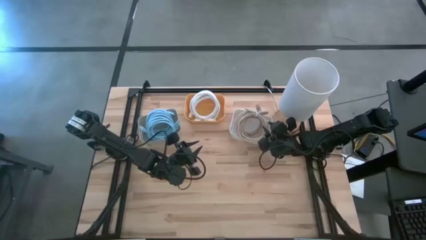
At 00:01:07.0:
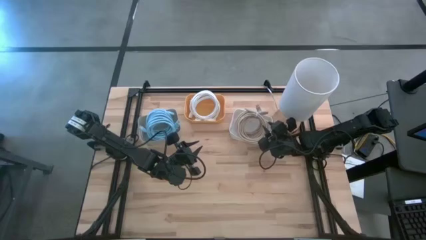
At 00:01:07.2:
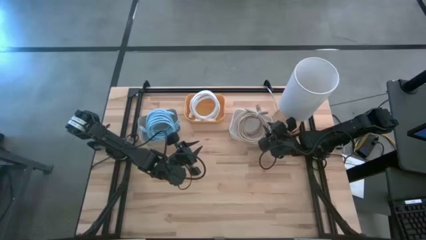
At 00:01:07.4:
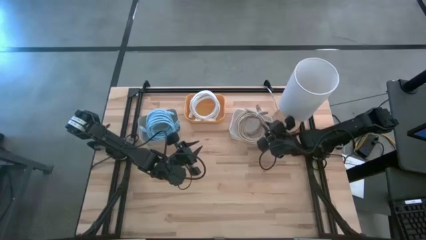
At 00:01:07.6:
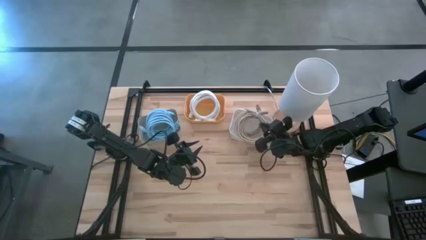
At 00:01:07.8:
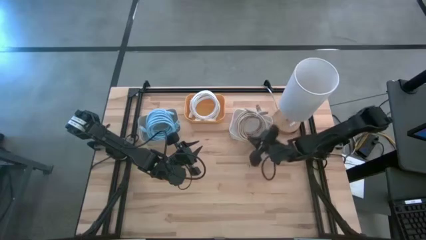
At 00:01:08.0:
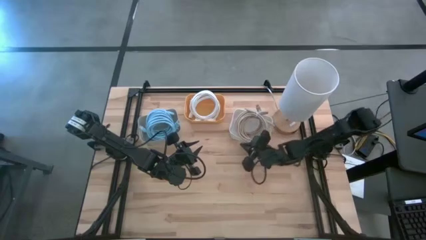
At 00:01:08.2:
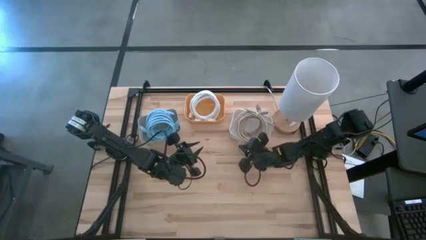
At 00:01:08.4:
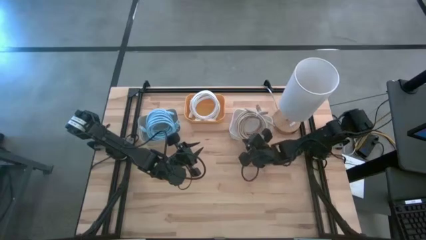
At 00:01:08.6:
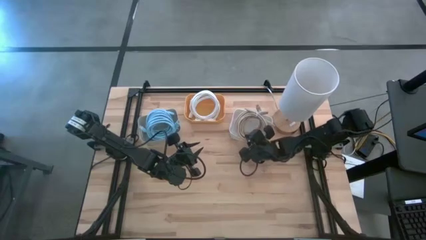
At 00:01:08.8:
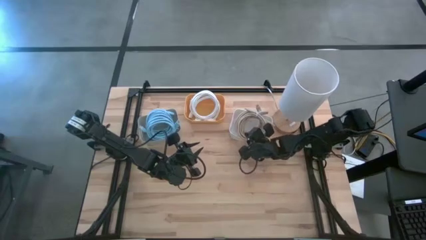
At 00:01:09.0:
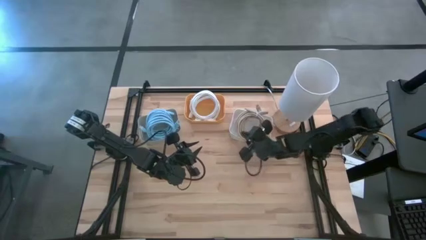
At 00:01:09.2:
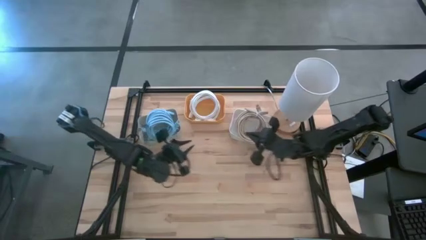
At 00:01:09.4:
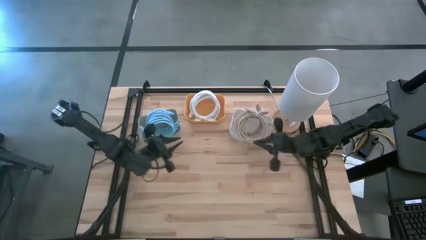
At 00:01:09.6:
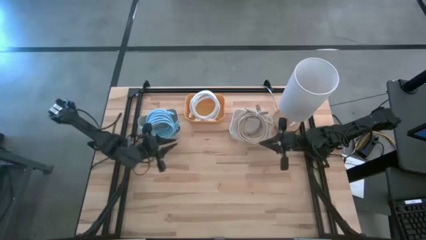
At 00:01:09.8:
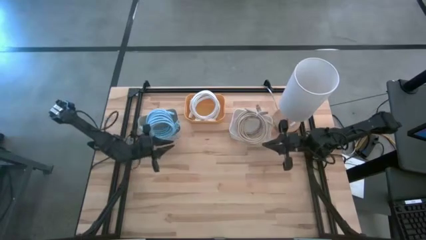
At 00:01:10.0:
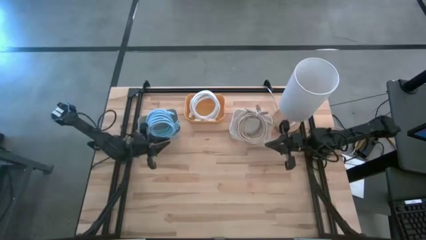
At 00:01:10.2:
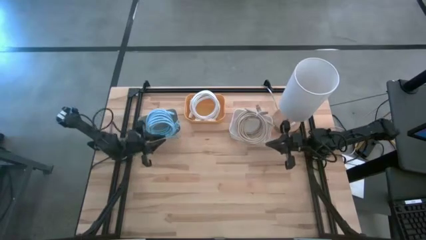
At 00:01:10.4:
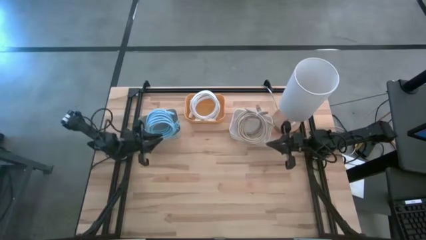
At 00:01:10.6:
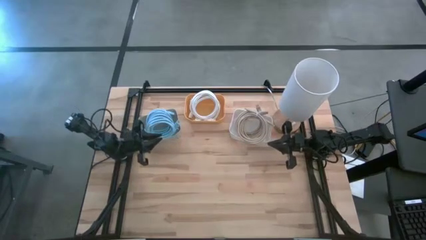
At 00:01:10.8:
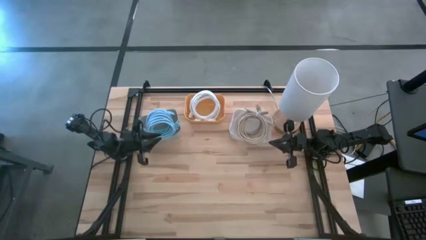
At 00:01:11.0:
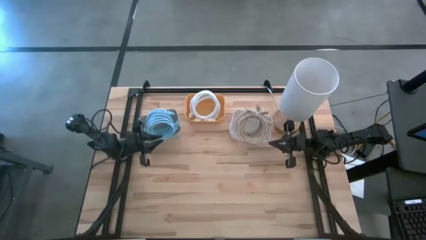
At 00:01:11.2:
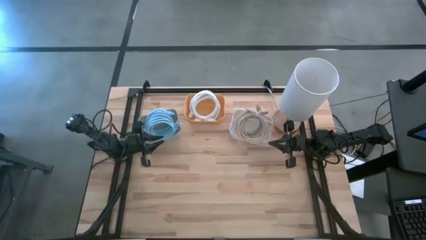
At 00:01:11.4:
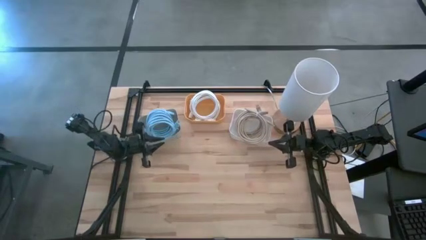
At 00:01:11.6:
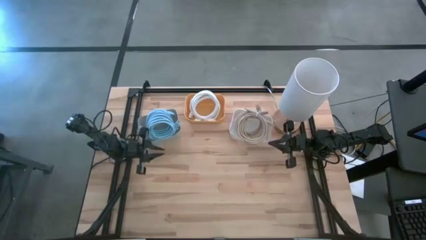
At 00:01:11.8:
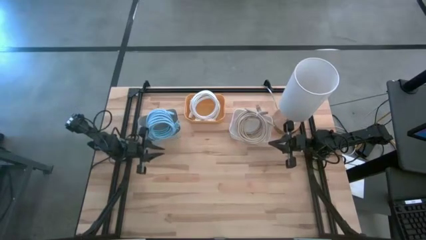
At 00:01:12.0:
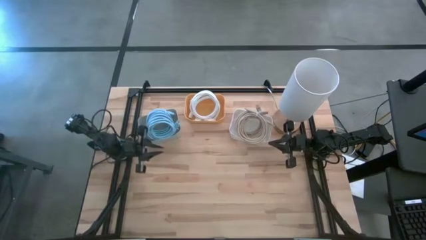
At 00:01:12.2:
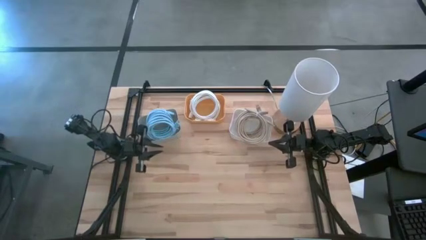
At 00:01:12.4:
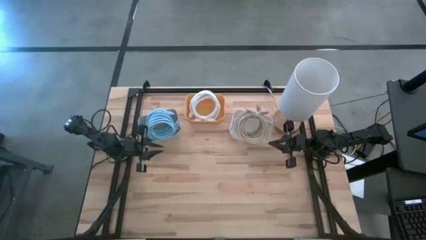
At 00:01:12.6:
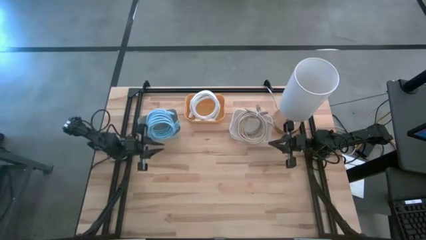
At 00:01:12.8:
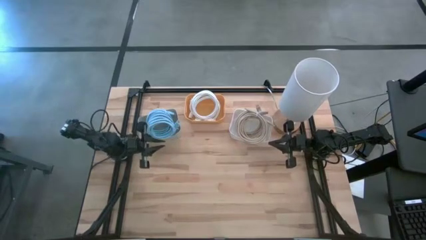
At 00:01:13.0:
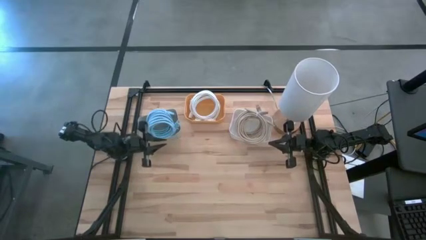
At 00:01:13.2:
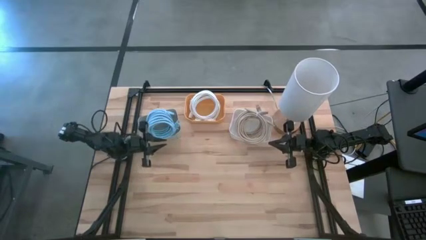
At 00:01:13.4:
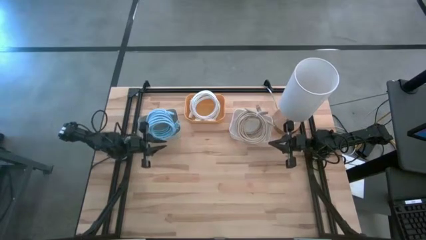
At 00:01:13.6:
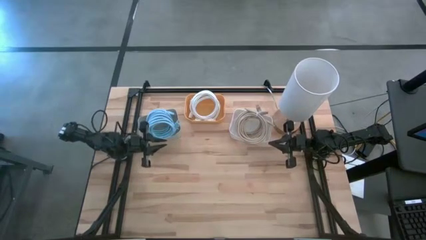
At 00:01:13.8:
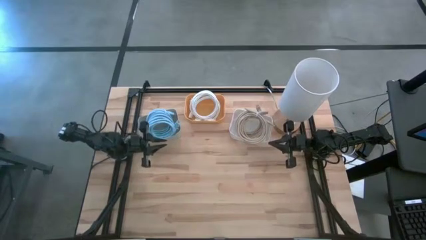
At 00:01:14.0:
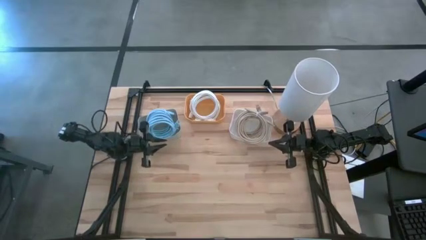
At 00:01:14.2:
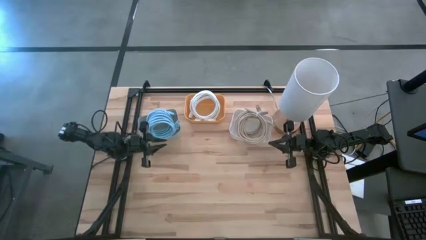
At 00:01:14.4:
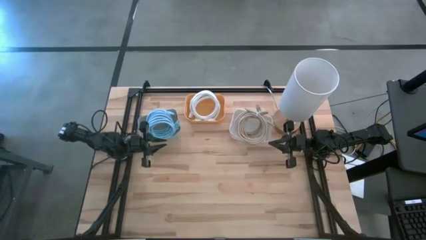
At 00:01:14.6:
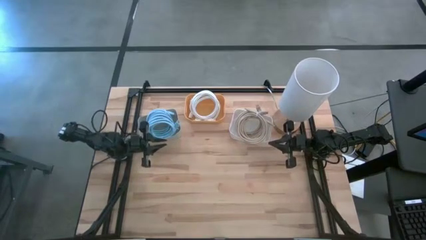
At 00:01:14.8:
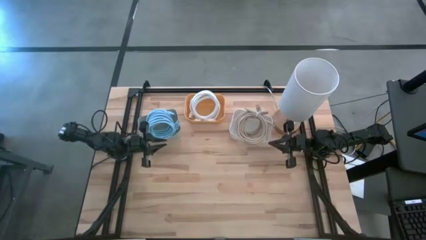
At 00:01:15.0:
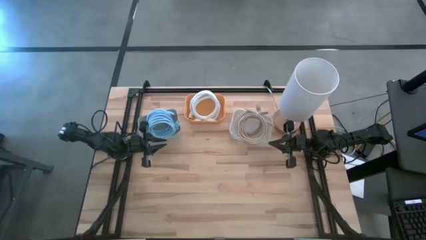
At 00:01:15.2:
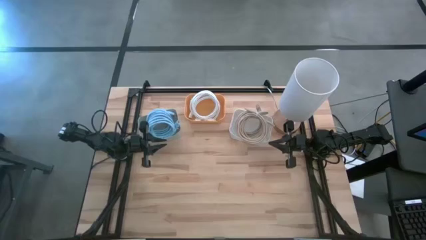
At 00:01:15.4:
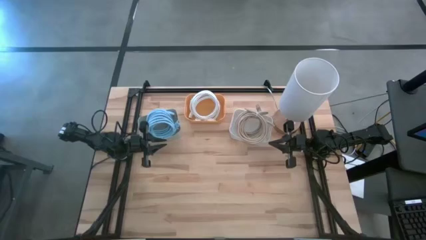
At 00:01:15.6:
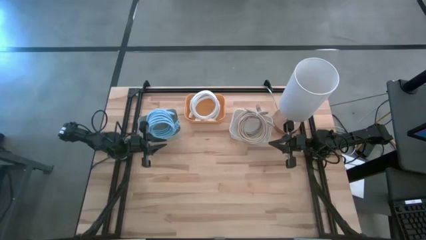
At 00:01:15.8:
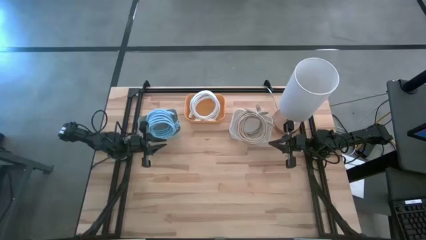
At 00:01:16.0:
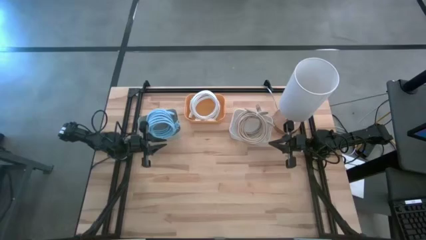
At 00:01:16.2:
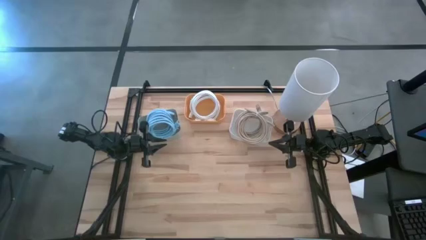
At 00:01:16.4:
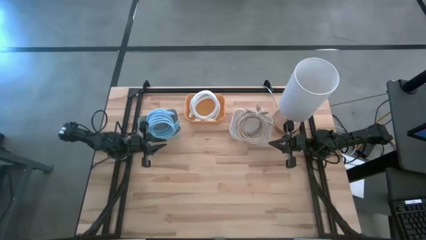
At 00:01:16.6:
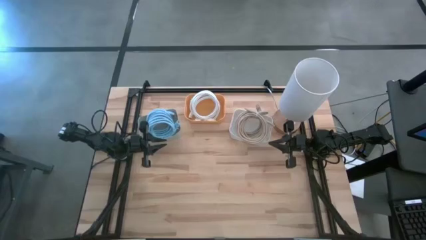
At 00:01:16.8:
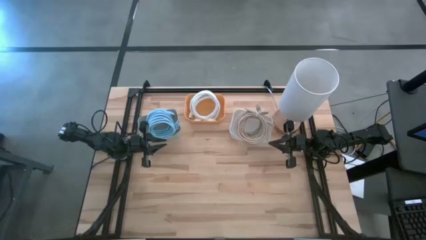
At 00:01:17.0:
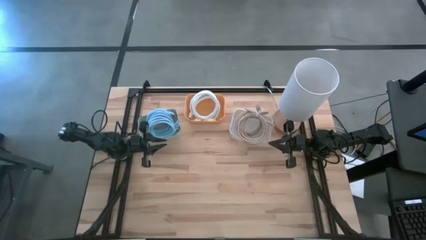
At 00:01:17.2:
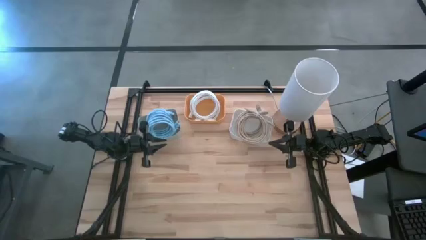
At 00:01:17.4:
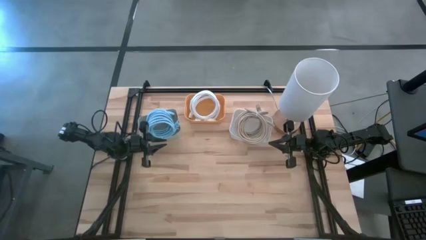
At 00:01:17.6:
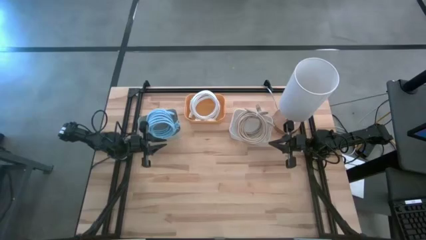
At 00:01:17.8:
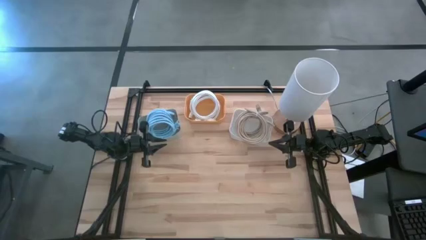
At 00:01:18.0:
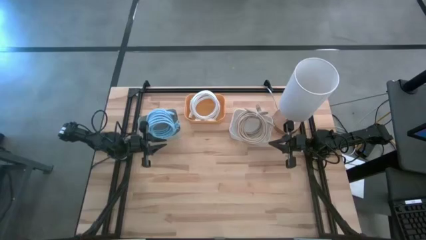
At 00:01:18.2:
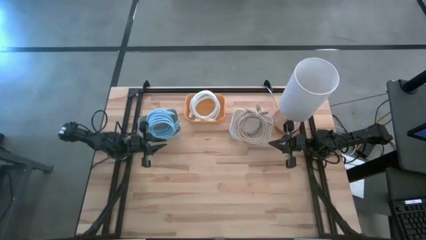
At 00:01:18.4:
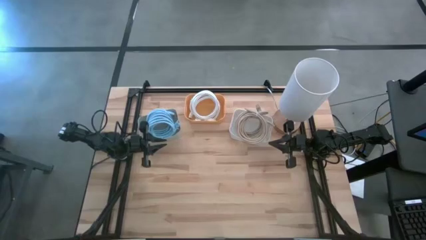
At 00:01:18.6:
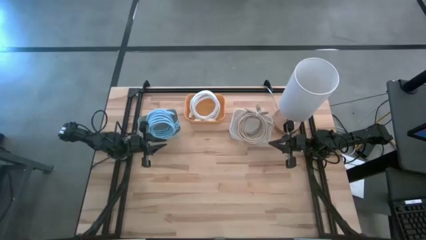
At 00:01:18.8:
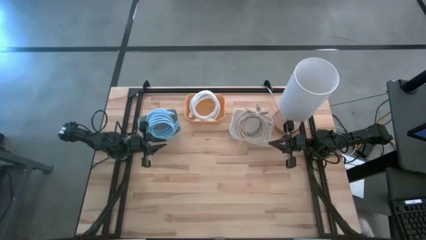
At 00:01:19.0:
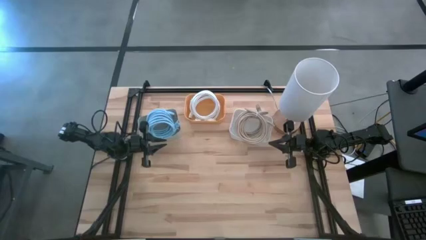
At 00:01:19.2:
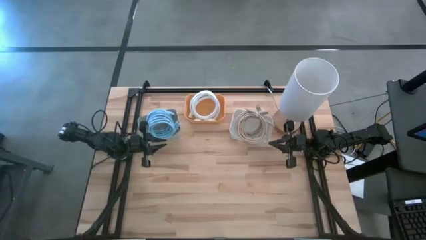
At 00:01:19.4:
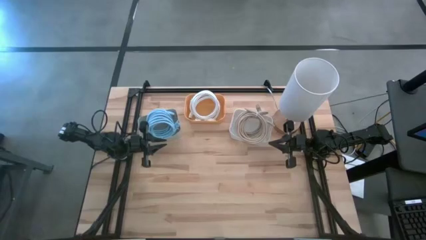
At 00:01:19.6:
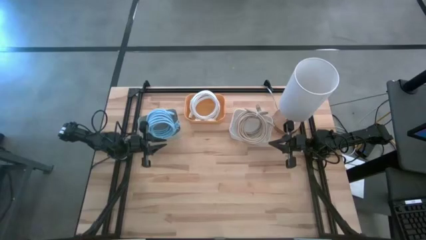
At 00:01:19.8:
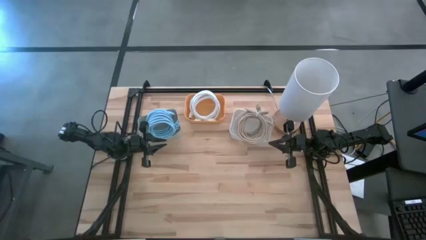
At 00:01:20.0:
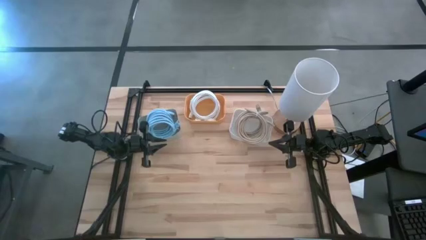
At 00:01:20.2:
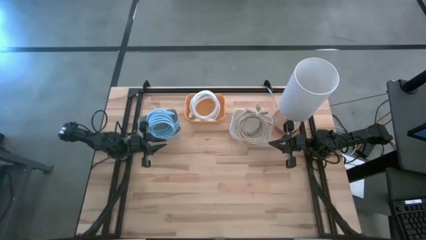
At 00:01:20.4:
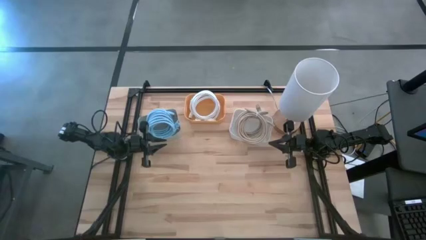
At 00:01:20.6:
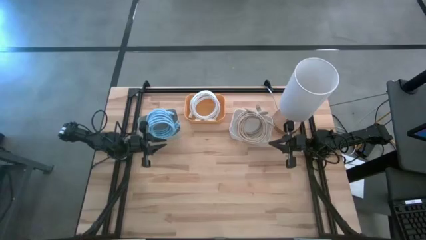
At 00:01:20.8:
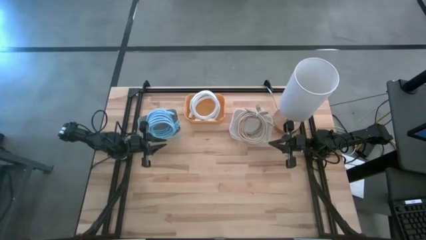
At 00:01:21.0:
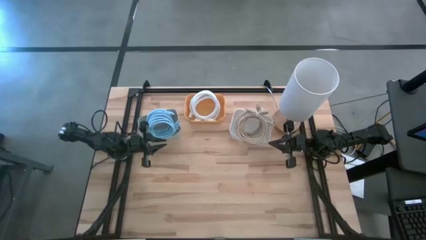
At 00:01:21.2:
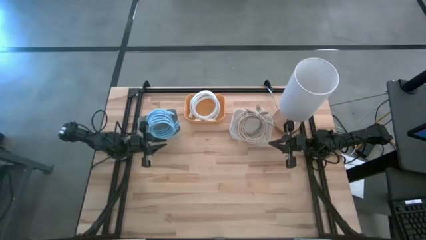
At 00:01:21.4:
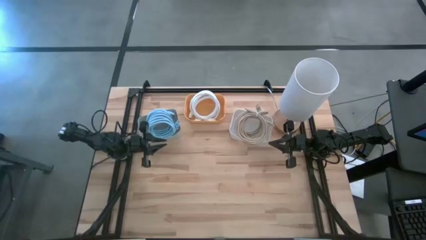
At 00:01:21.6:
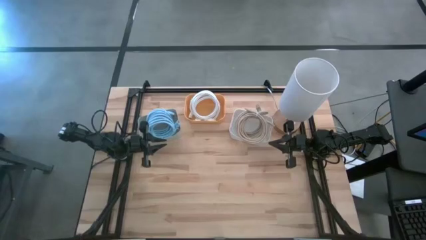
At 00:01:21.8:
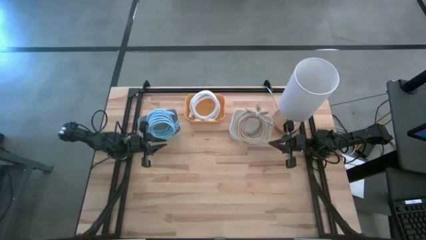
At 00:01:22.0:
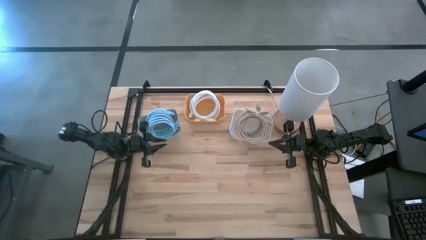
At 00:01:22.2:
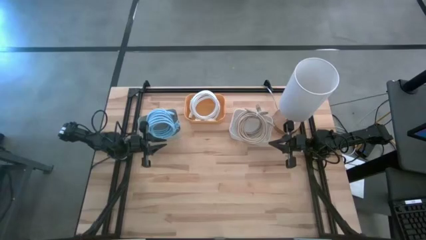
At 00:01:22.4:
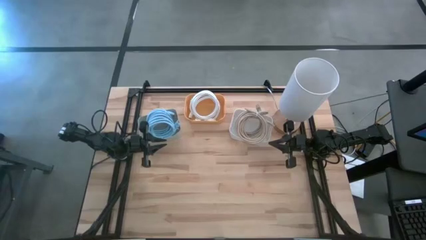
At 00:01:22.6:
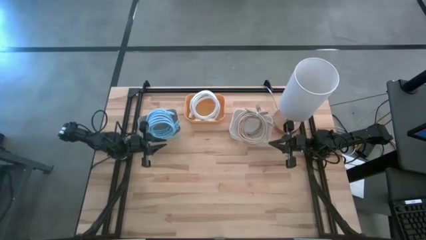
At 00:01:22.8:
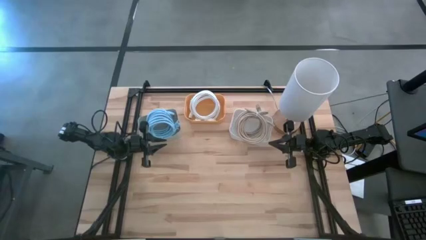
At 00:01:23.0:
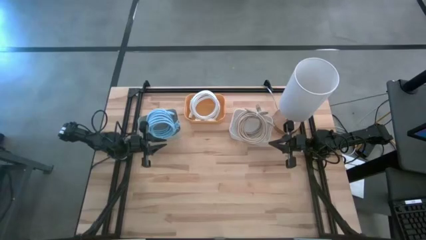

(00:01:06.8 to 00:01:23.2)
Task: Sort HDMI cables
Return to Home Position
